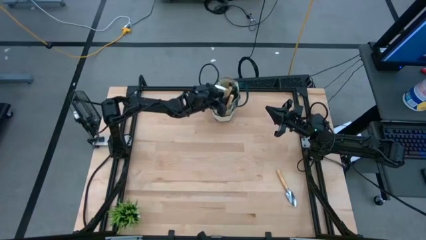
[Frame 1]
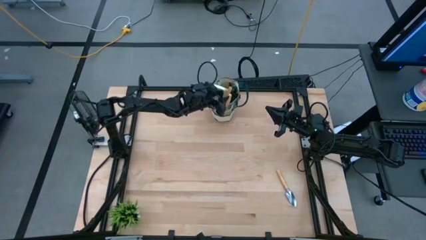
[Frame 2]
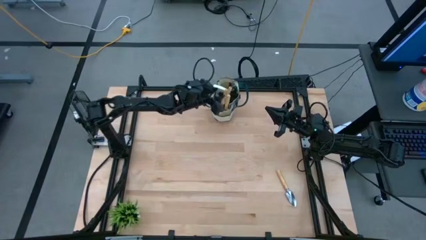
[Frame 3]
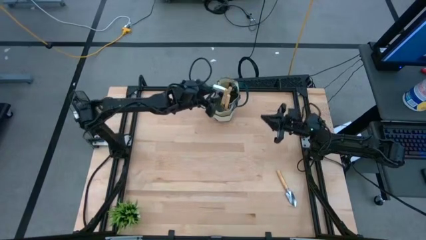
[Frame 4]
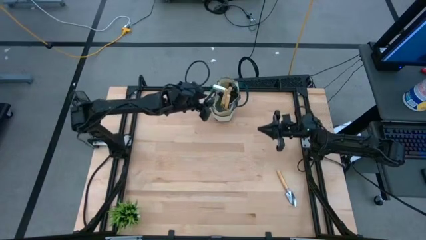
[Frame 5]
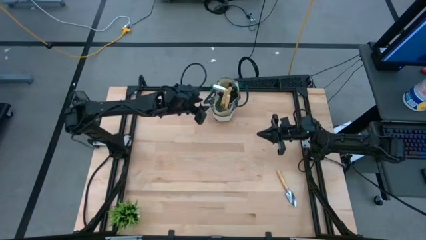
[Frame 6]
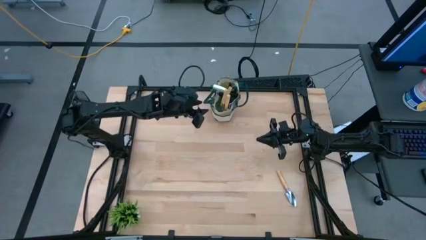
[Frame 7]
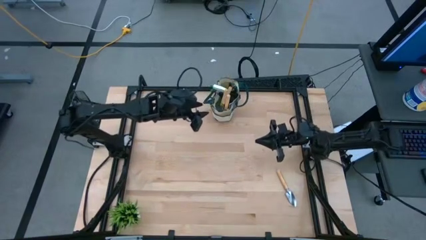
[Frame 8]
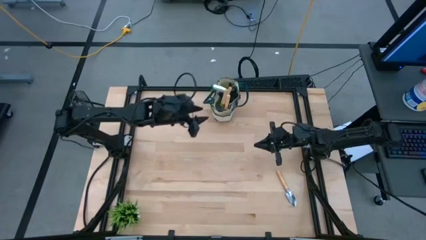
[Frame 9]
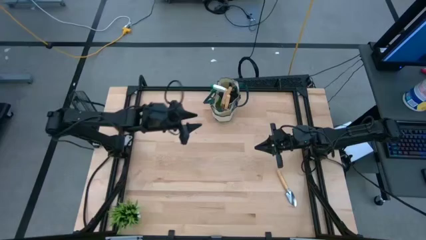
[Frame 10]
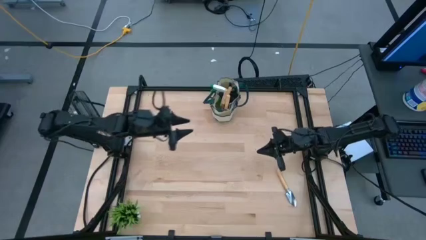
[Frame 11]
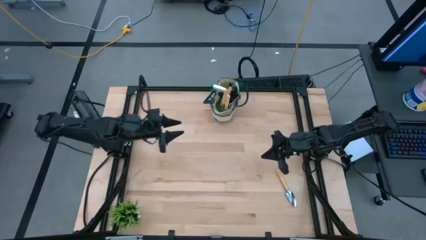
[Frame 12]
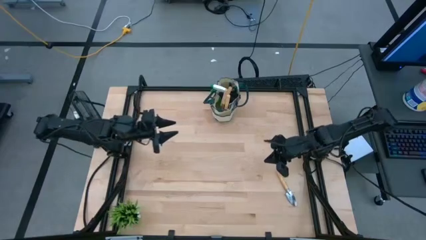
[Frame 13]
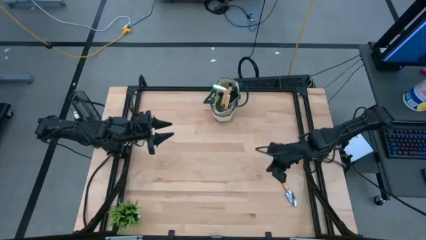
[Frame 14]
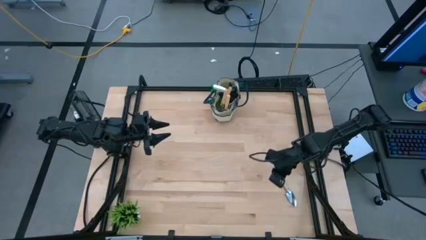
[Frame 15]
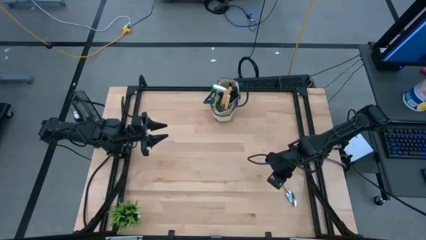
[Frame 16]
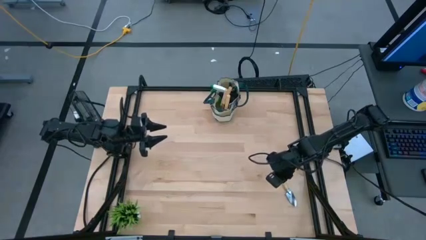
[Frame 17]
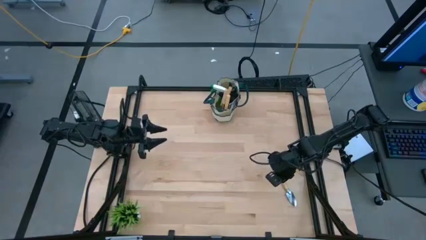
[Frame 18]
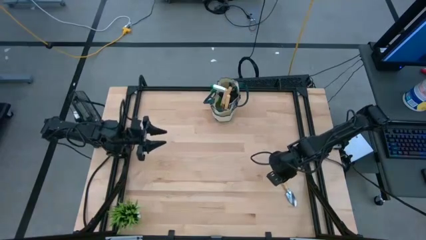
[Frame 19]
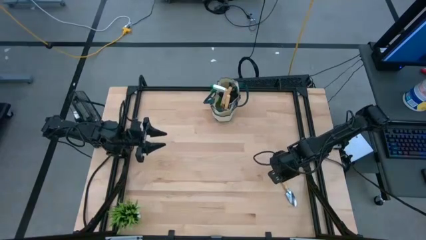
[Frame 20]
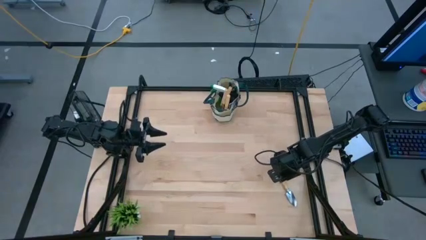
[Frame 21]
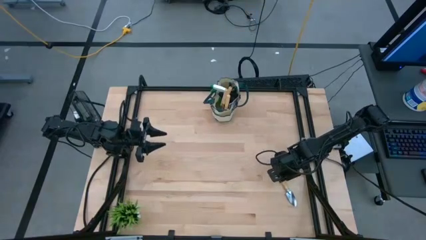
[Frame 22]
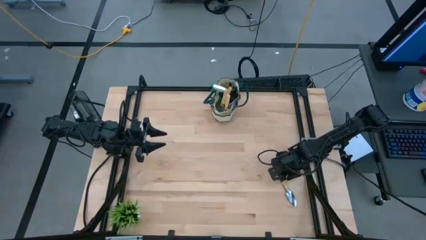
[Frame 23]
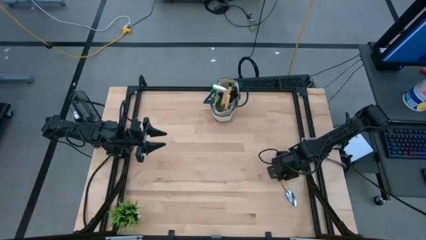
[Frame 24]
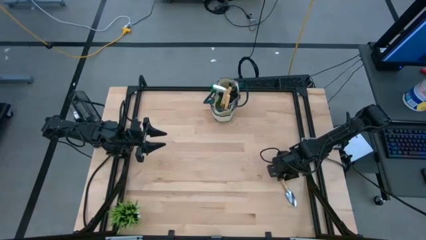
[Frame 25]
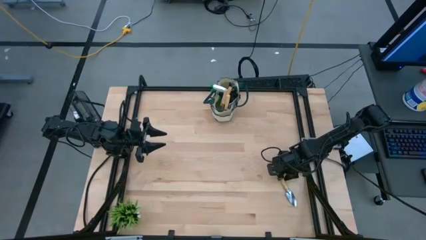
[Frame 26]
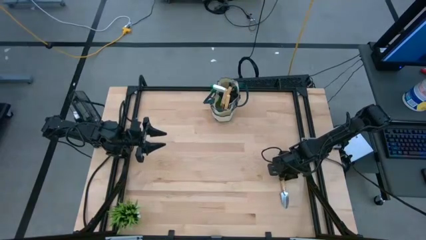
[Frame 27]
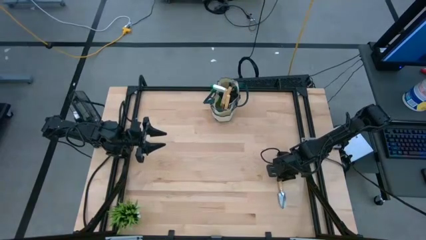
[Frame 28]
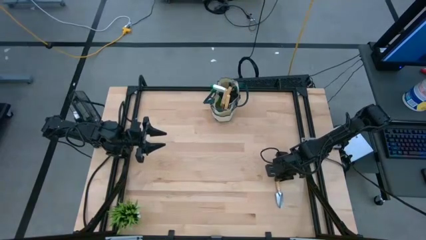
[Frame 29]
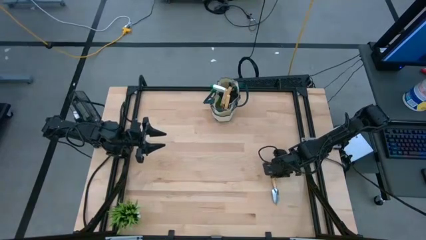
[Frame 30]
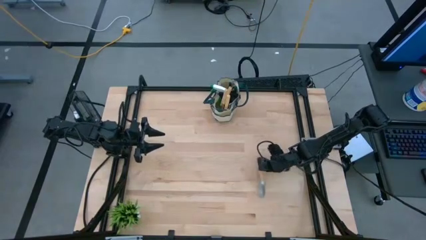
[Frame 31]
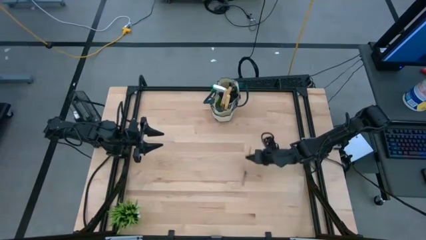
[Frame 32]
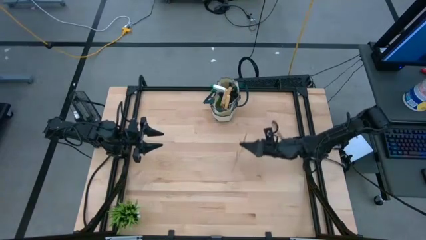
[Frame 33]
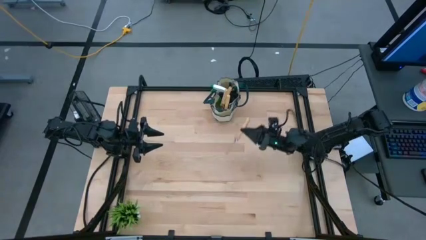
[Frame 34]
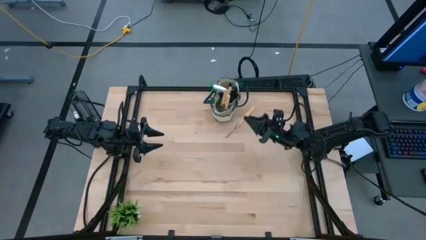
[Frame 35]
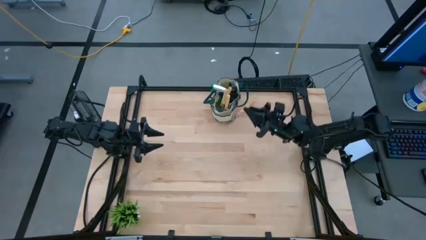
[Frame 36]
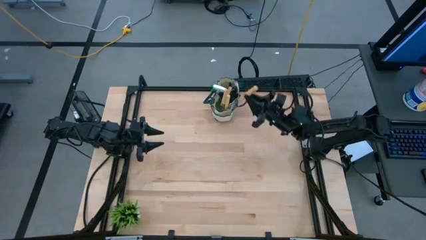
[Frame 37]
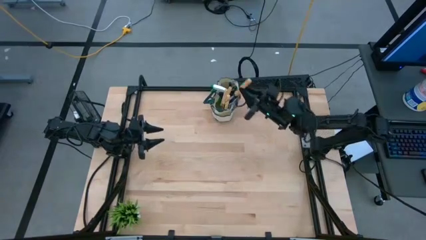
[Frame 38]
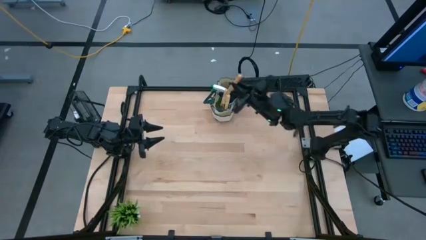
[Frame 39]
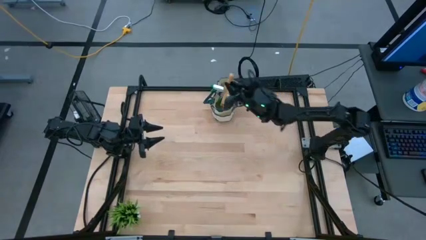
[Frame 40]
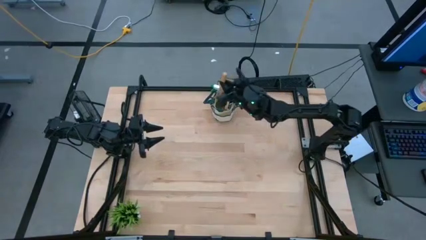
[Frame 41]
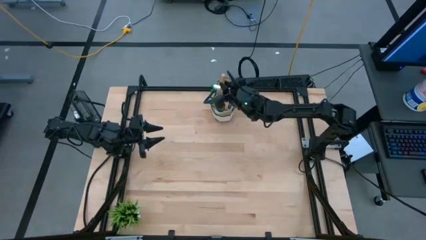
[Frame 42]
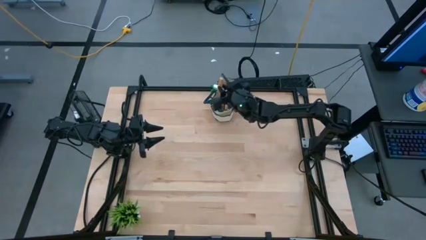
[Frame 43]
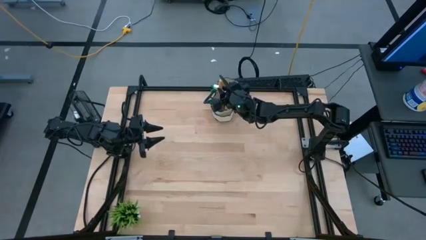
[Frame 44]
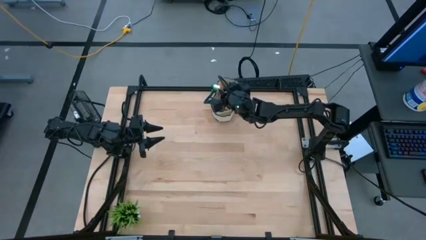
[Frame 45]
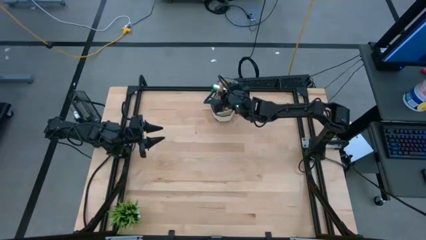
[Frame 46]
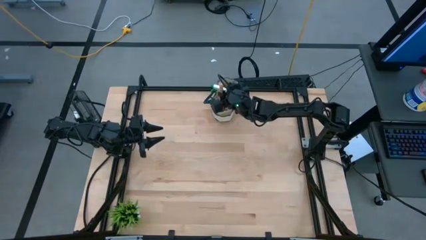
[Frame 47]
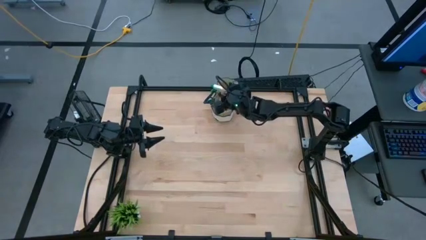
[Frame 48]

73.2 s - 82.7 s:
Task: Pick & Place Garden tools in Gardening bag
Put the trowel into the gardening bag

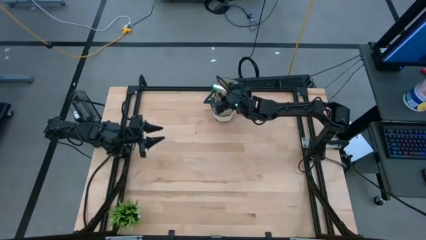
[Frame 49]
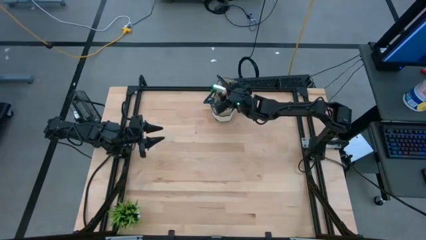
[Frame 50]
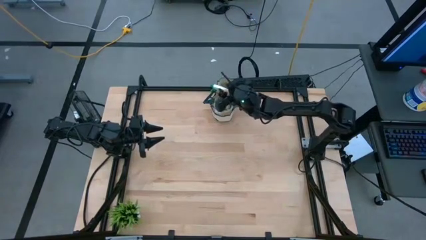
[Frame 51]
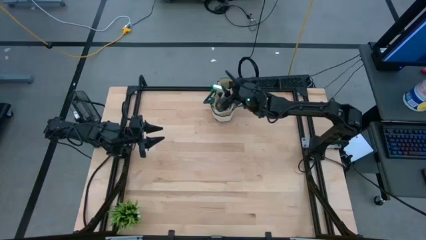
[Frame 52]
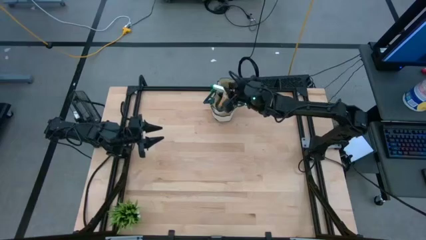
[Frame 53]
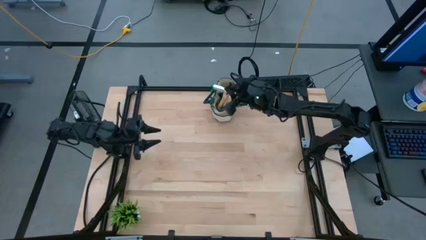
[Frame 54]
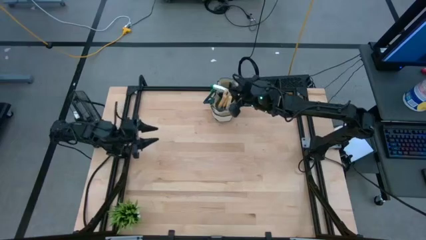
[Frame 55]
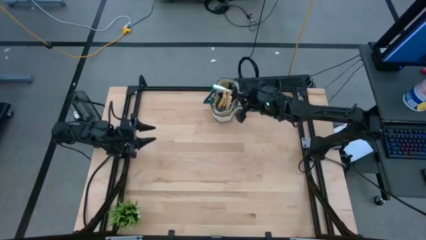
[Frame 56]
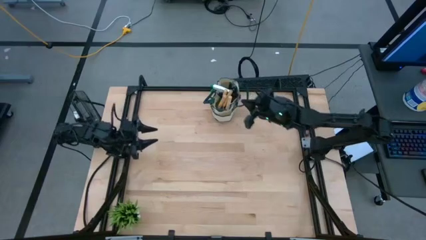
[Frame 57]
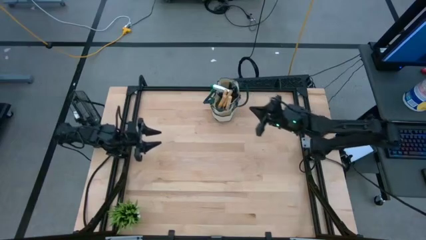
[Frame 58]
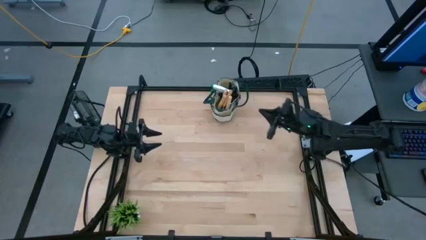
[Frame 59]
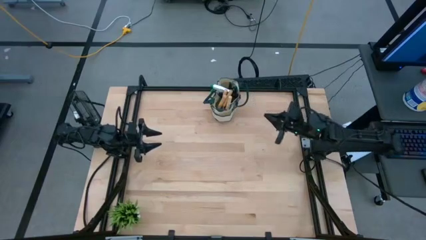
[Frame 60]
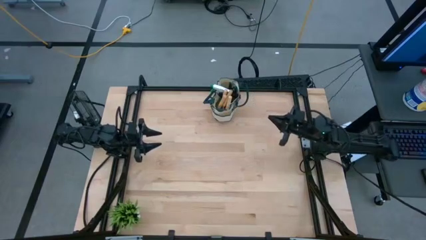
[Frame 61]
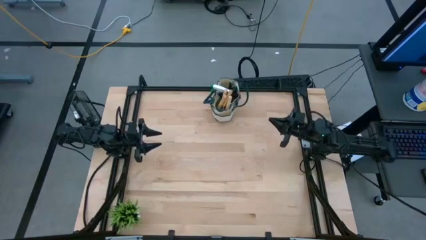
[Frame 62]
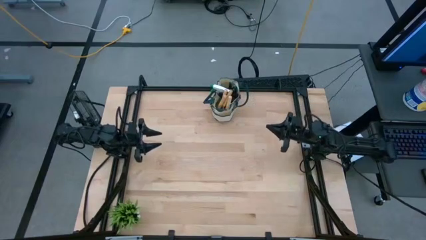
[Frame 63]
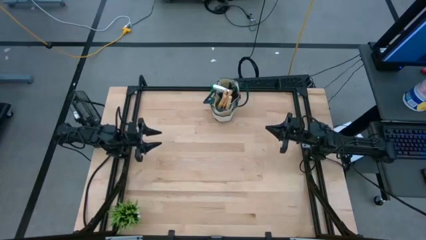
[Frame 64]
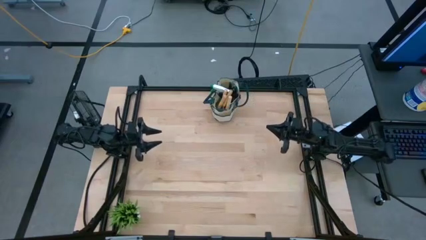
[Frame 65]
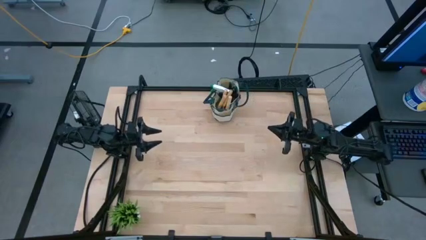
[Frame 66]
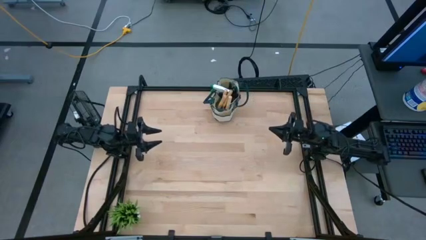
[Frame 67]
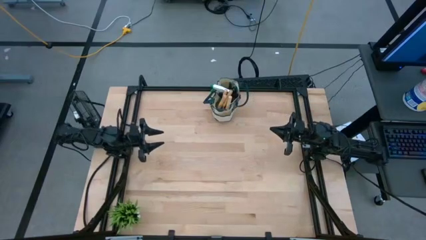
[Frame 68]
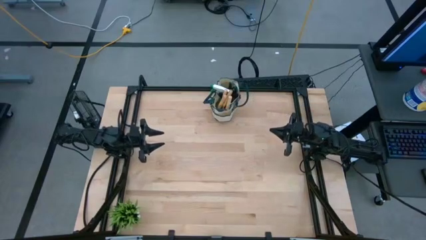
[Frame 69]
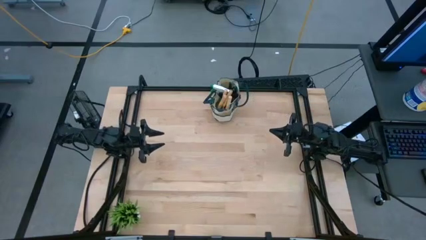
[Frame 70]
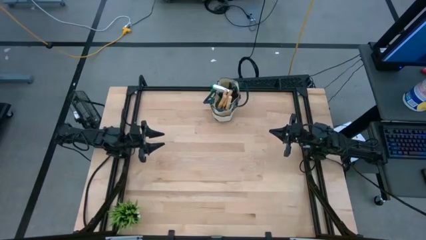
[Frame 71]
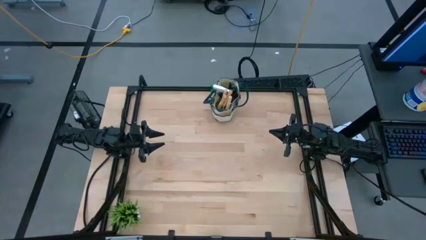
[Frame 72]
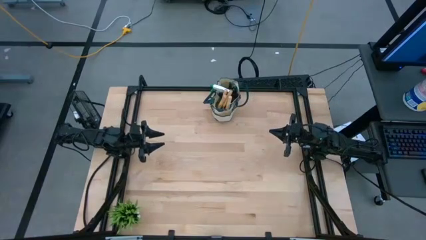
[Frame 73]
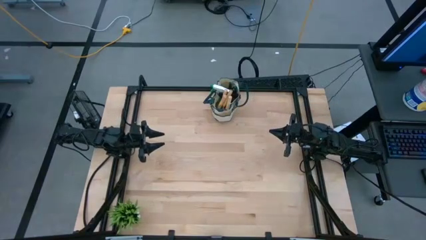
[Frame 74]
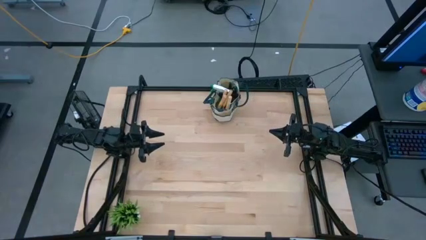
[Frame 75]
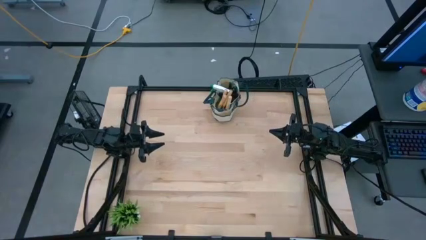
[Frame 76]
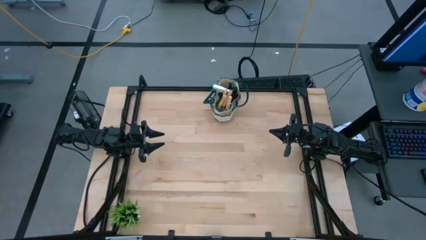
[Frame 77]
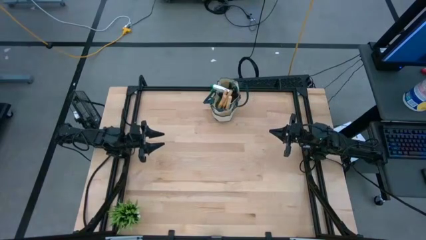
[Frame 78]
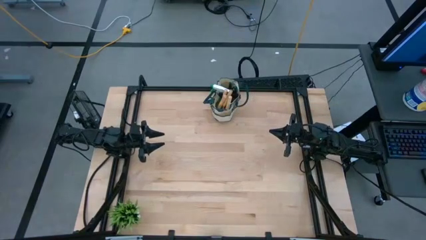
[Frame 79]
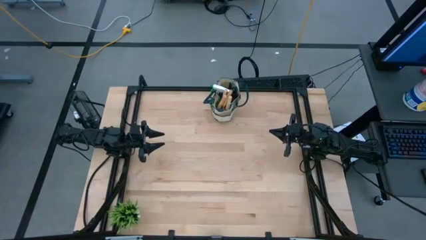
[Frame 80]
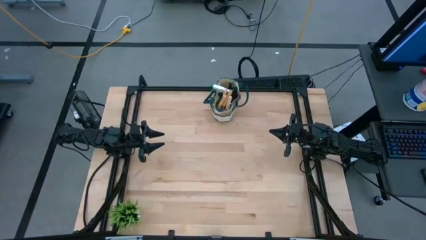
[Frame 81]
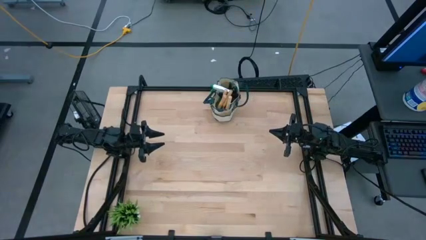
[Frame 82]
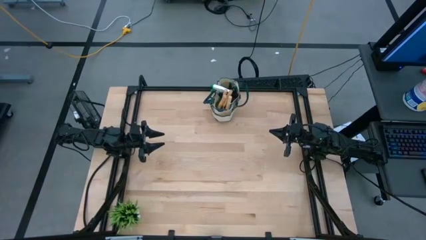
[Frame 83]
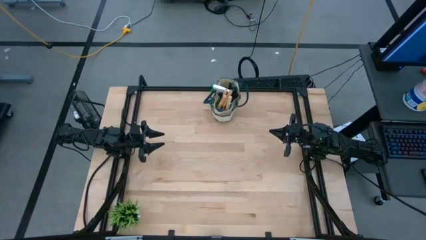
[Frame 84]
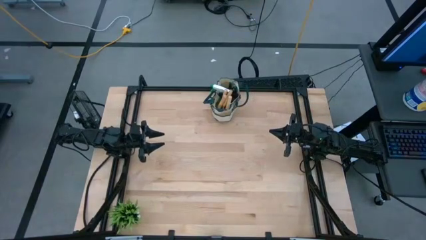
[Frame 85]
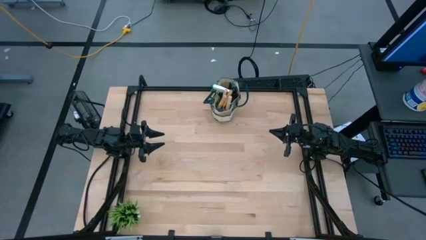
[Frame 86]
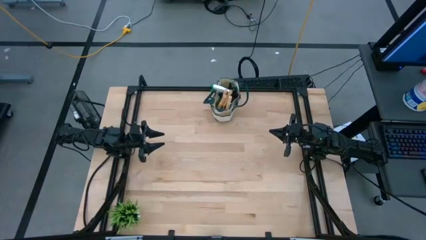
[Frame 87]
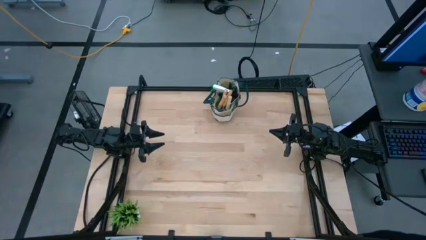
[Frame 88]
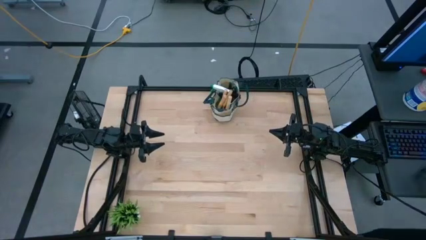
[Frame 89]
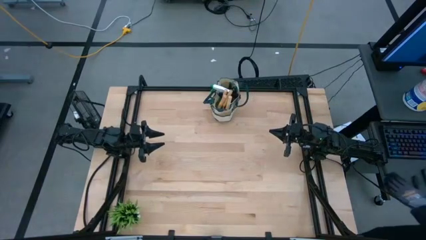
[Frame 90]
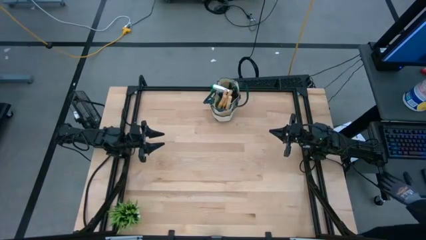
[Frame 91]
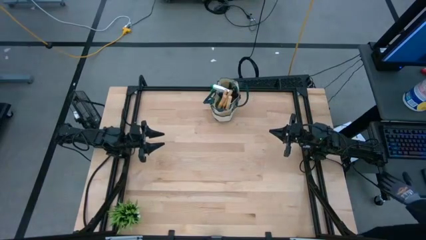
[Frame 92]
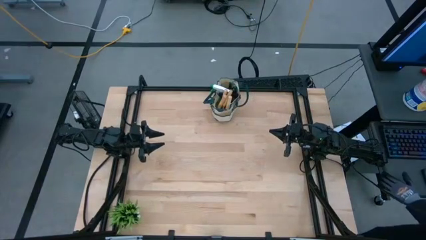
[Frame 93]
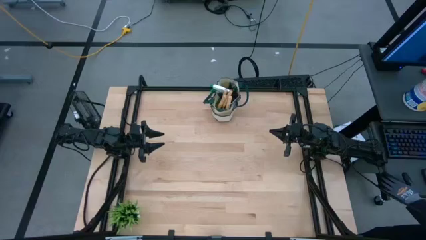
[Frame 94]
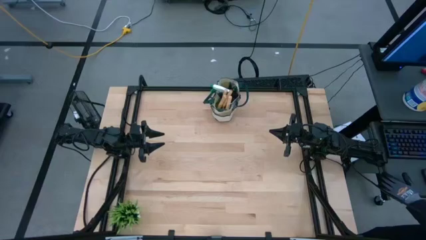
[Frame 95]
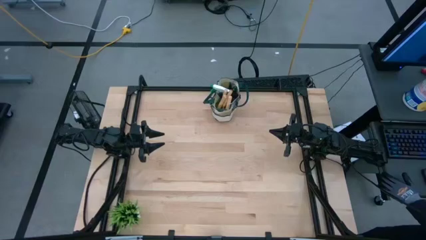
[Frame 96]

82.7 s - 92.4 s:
Return to Home Position
